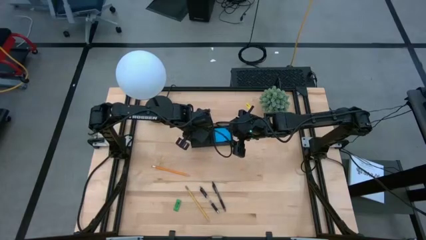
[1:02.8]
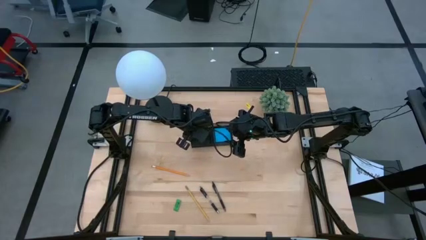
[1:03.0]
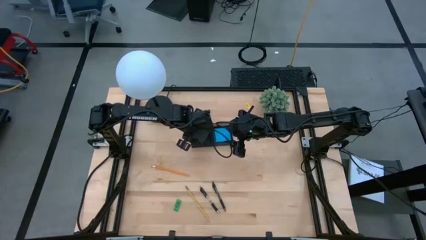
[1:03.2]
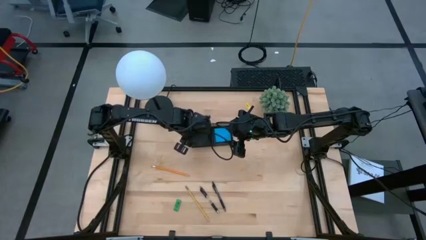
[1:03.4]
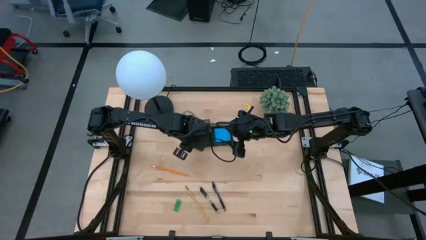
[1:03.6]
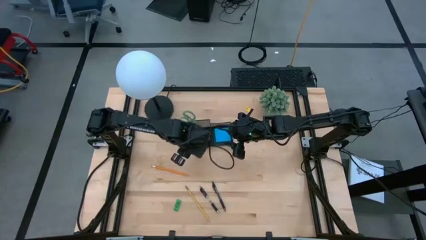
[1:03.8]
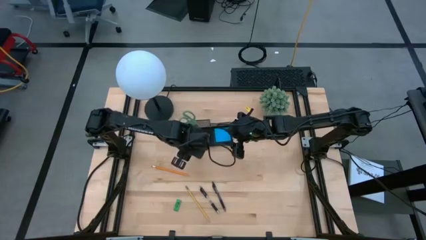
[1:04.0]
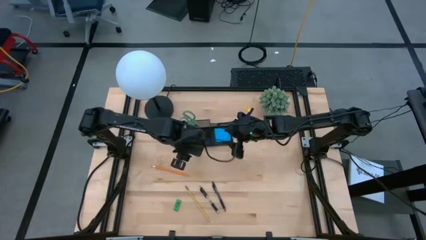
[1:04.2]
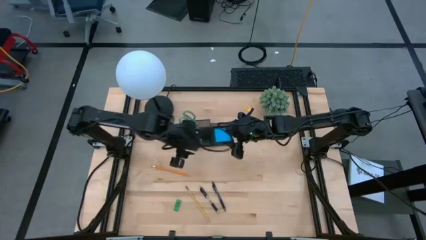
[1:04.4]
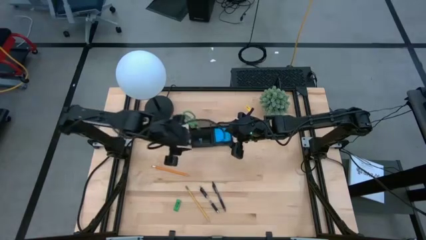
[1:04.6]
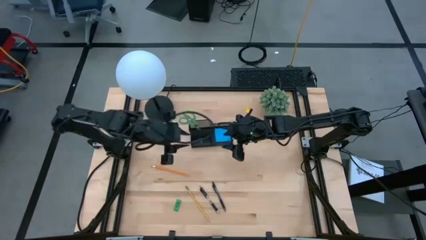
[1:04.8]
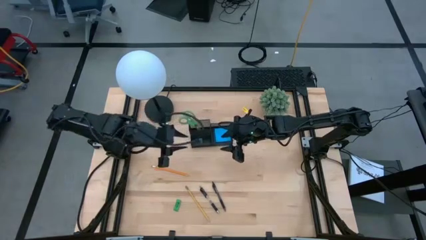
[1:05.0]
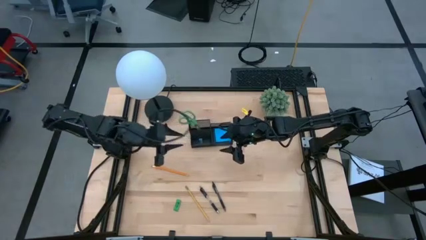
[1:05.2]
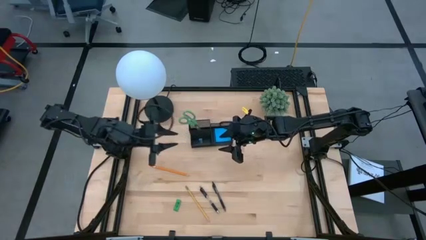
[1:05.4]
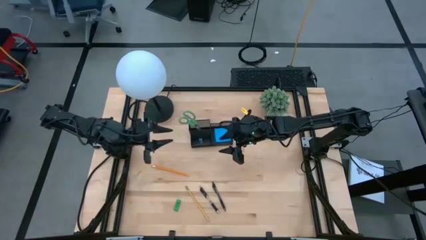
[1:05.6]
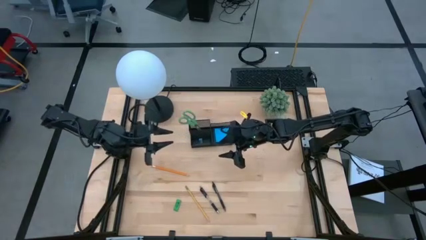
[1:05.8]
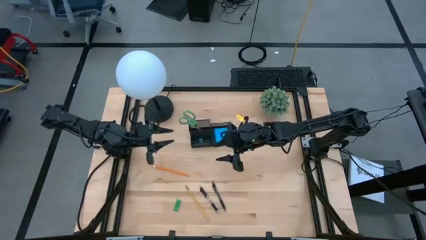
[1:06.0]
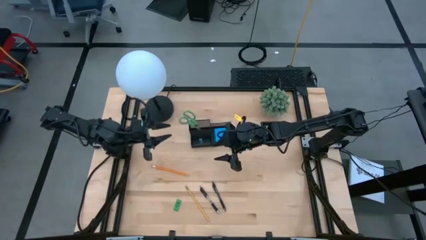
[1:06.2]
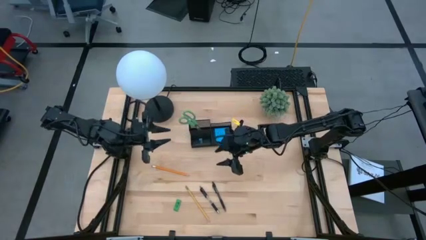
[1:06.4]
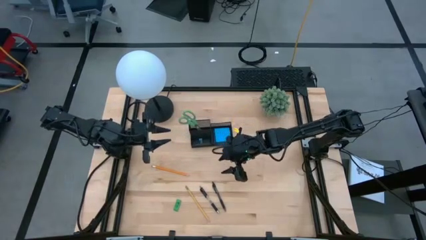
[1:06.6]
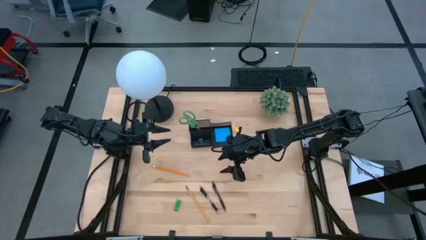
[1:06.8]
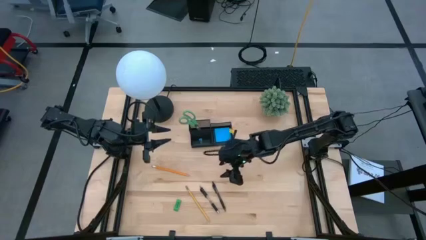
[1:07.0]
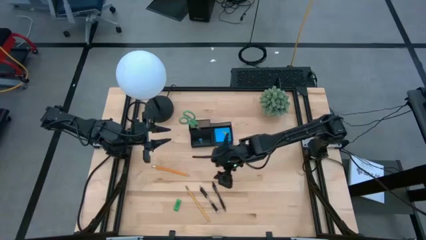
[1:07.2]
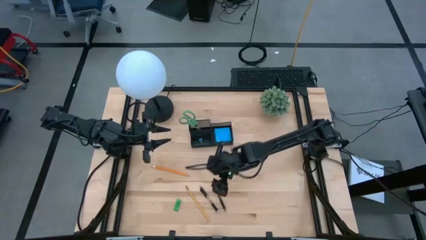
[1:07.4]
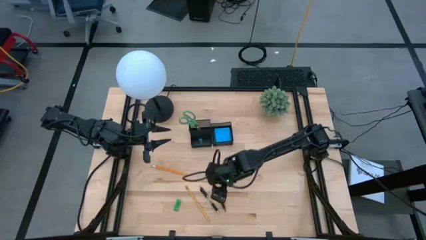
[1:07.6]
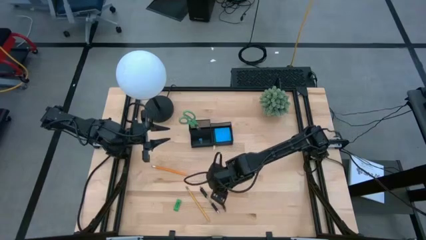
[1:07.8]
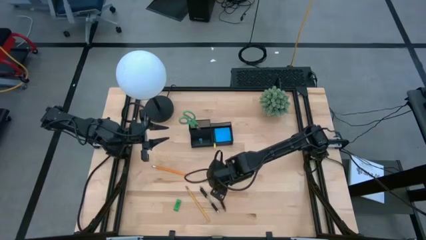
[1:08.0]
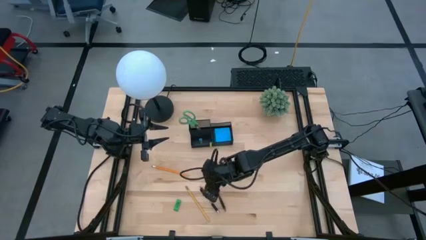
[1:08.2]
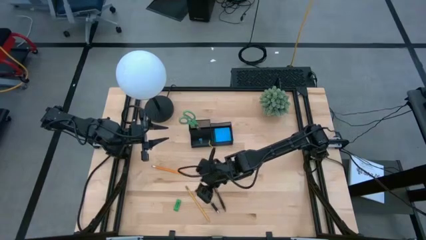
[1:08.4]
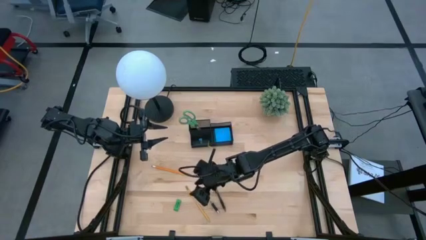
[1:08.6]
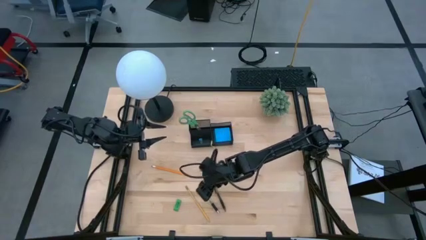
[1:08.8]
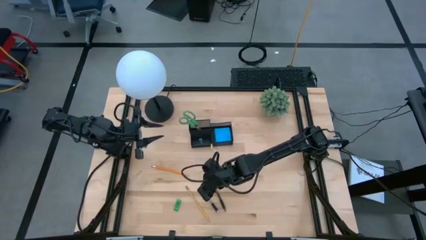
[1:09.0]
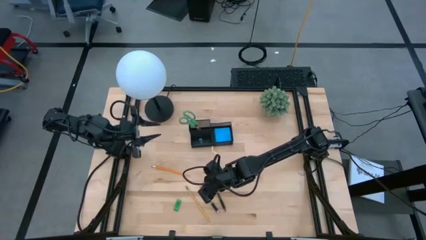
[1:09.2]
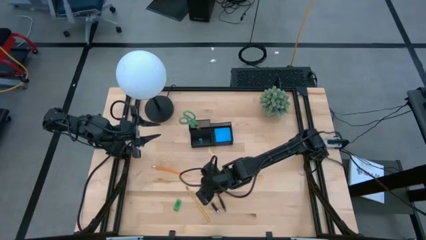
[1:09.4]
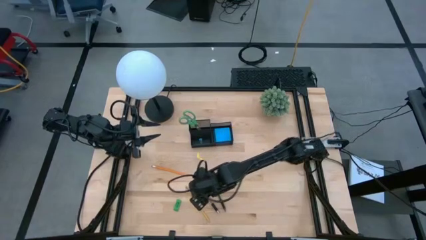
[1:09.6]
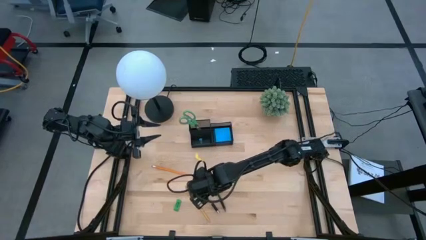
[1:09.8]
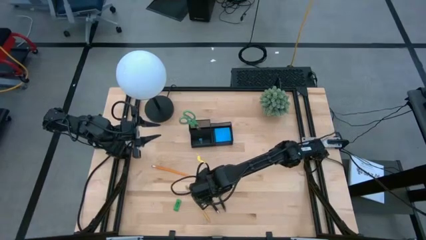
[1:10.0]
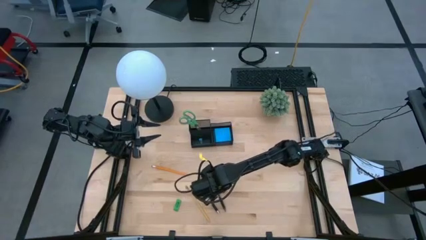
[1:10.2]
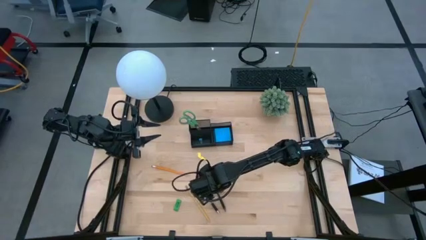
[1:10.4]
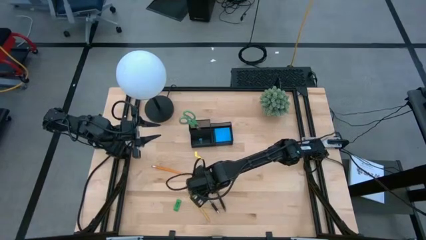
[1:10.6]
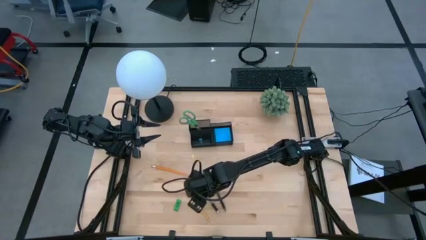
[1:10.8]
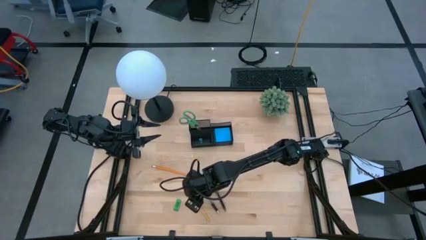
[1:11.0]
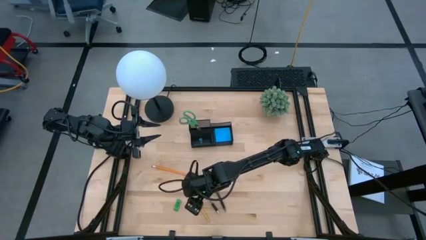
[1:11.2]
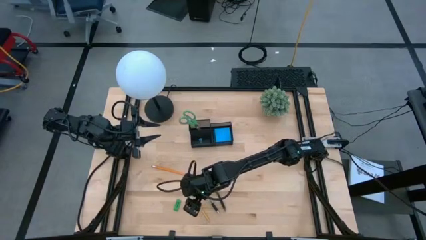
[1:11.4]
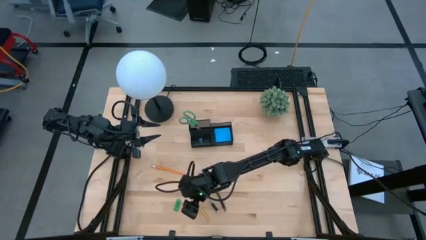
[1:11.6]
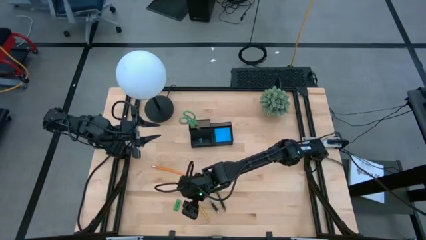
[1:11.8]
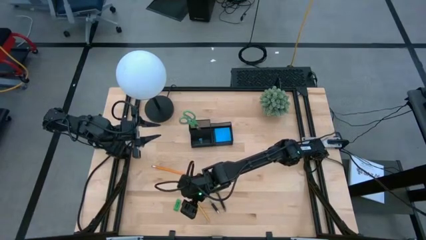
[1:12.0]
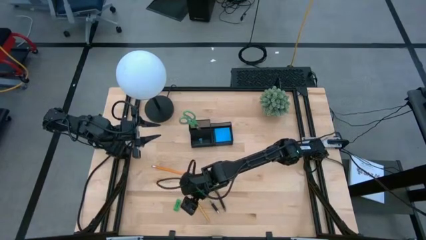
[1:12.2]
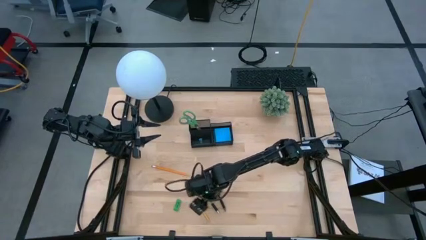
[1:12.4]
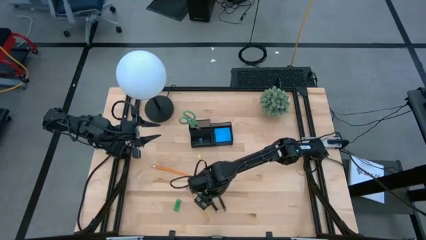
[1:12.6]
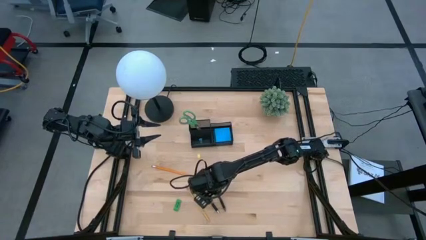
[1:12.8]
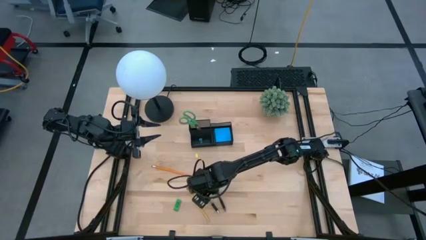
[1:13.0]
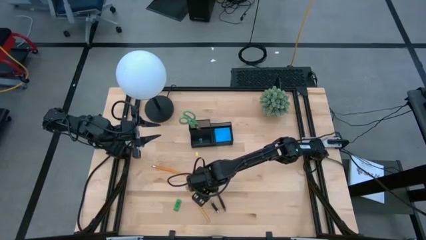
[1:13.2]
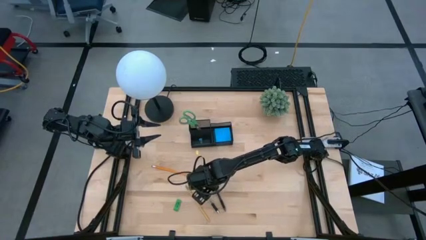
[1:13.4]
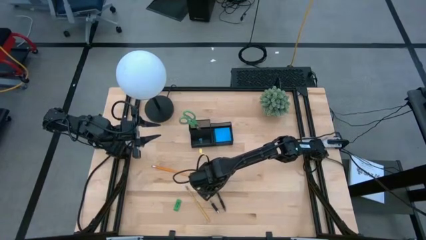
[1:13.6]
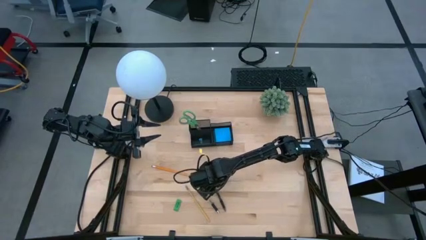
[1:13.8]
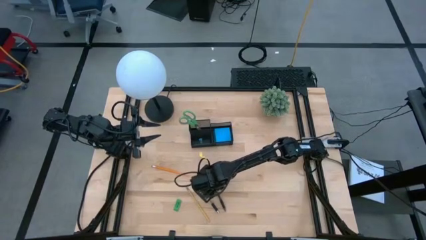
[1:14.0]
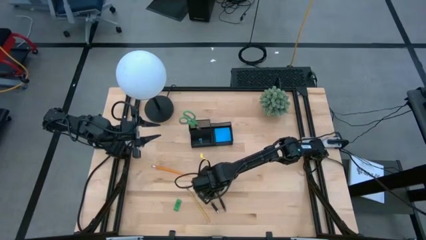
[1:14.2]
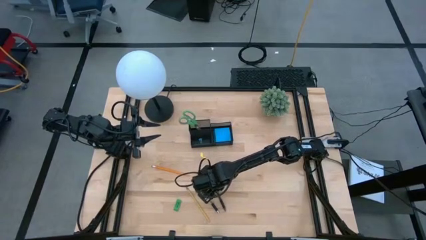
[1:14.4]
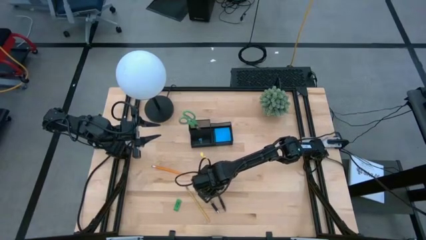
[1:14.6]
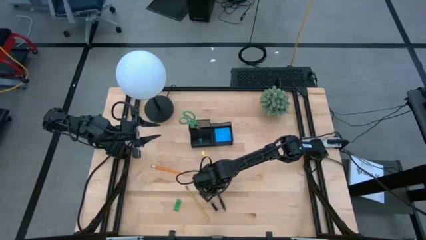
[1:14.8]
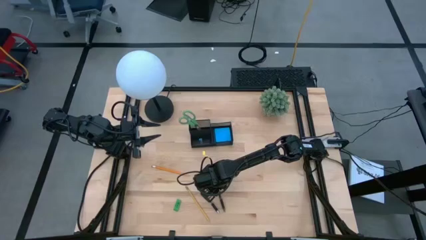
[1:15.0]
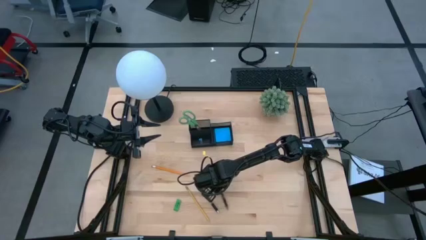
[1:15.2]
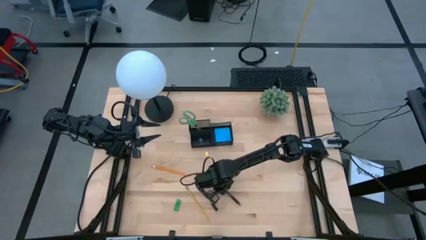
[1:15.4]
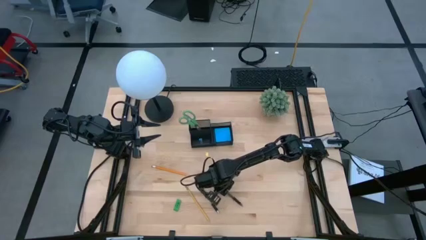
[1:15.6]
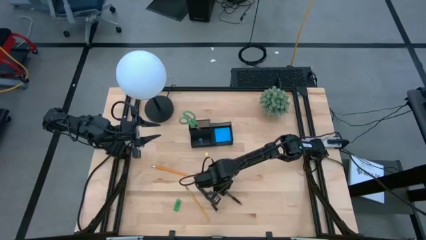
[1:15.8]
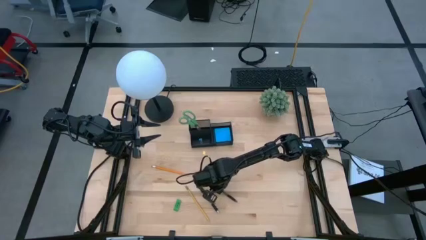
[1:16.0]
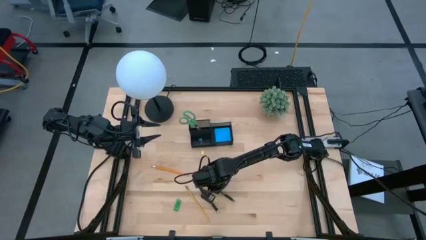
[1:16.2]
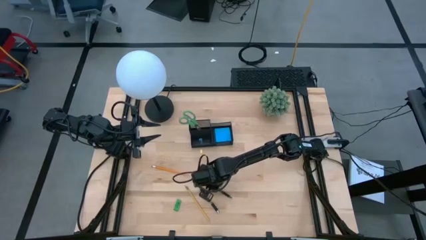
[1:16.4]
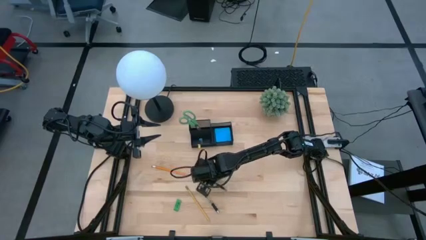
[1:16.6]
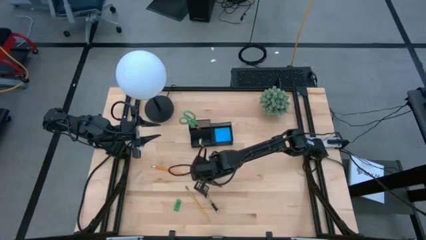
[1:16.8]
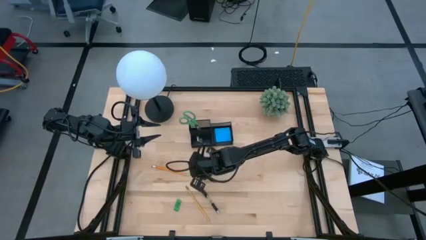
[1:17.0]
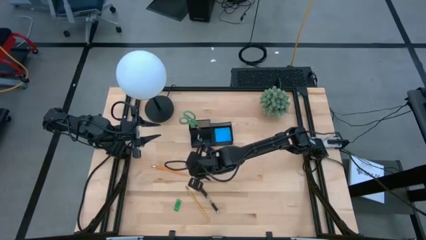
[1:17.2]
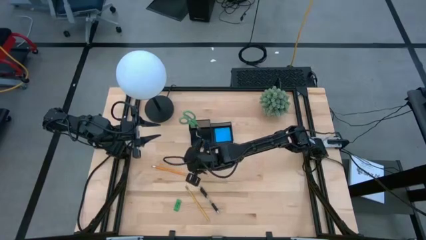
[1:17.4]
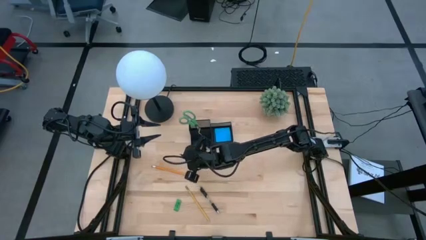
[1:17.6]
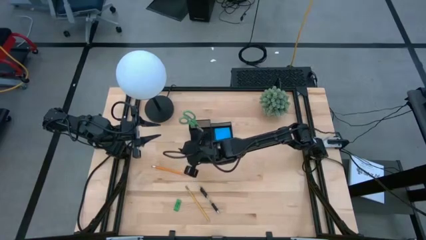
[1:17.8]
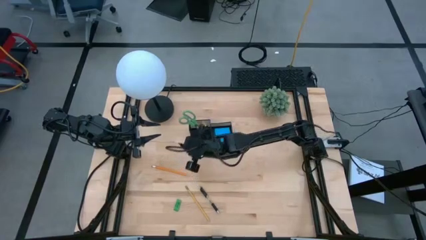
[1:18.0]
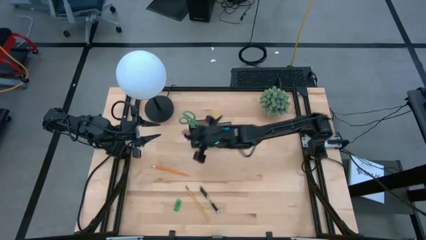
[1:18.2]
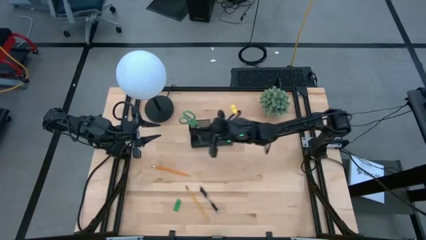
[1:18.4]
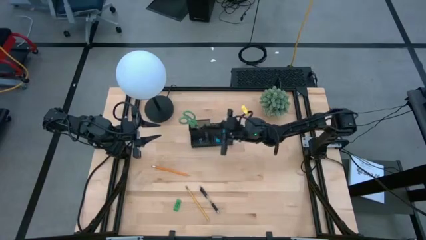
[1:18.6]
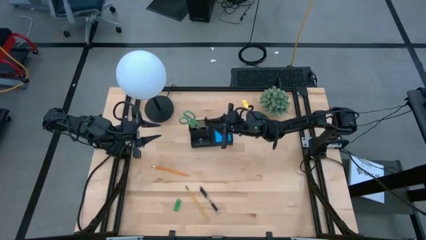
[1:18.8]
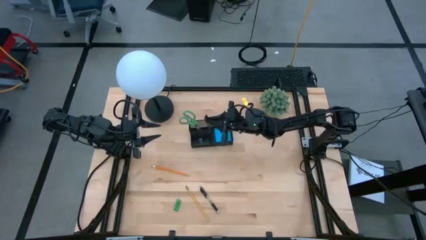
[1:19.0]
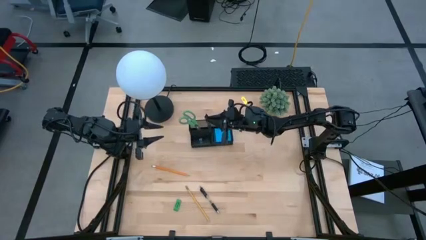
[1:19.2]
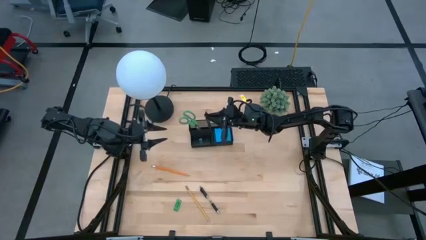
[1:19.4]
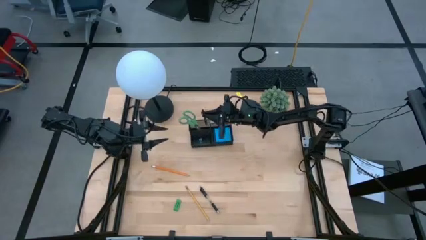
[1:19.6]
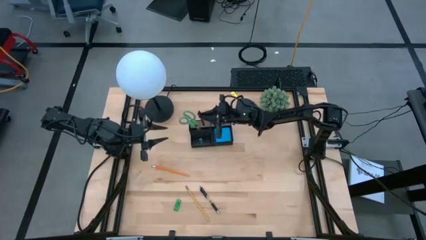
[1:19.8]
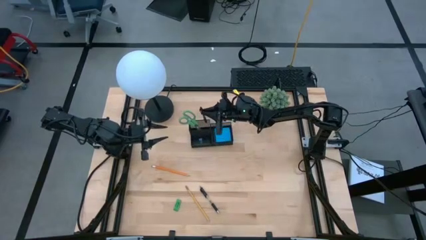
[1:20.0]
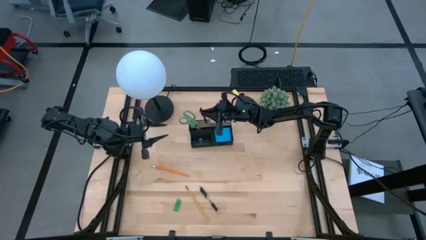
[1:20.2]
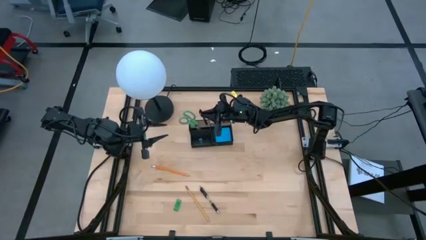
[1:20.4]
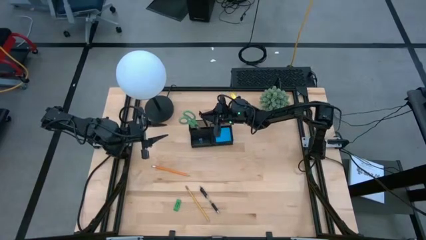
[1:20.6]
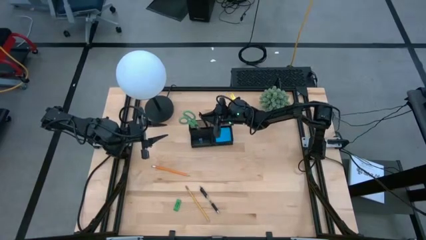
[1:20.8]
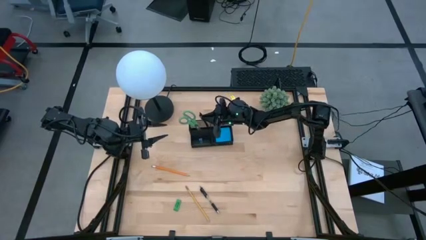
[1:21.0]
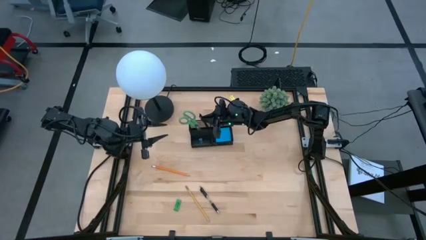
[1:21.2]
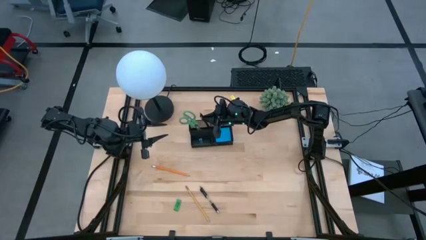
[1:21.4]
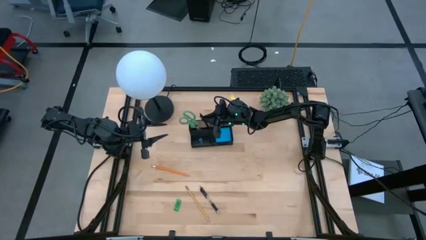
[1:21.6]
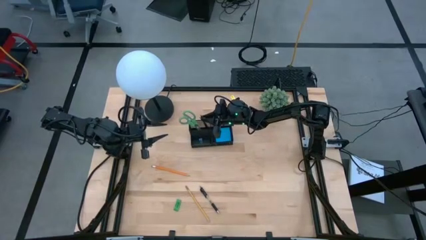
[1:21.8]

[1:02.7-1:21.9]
Task: Pick and place office supplies into organizer
Put the right black pen into the black desk organizer
